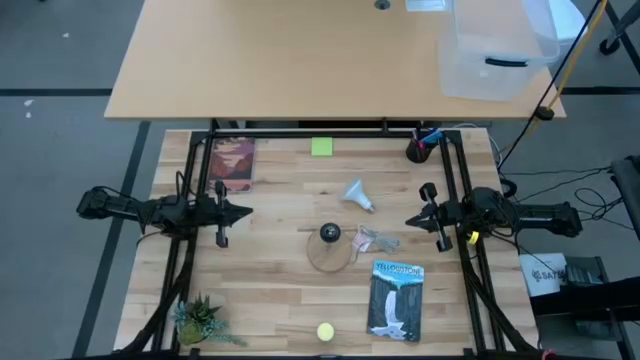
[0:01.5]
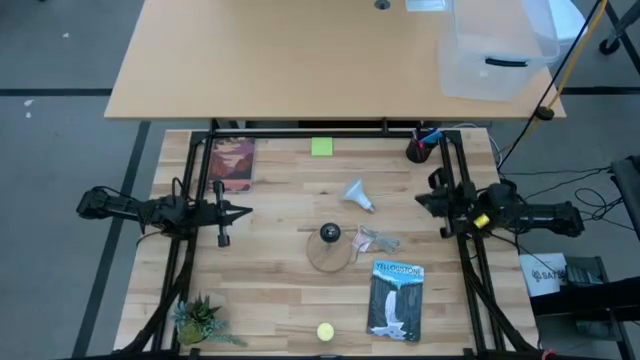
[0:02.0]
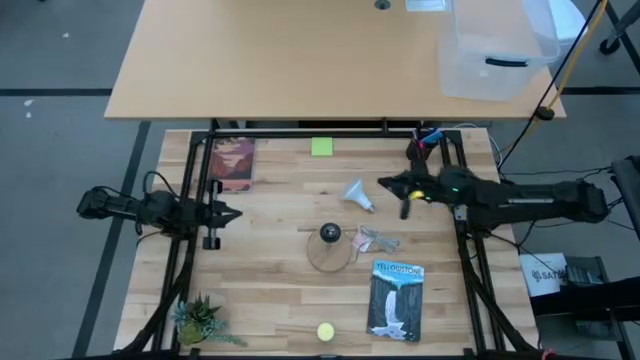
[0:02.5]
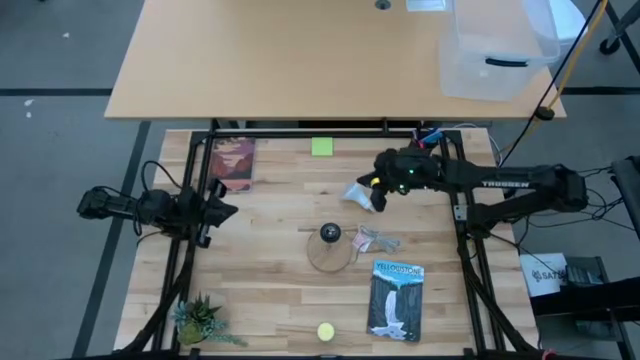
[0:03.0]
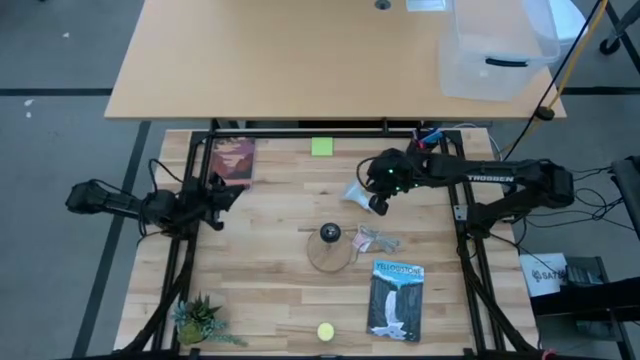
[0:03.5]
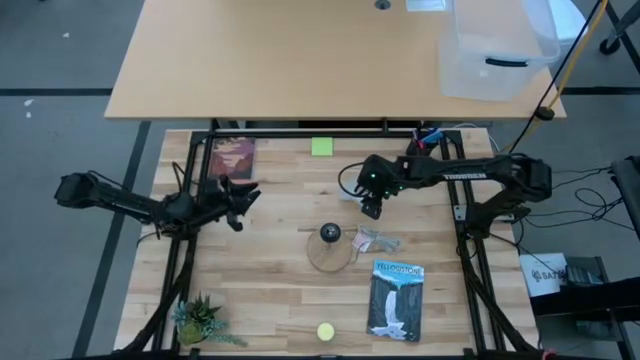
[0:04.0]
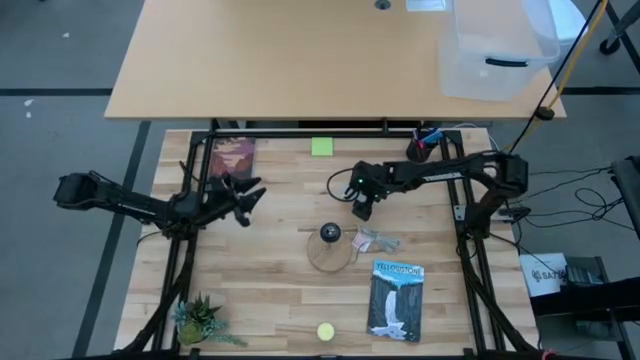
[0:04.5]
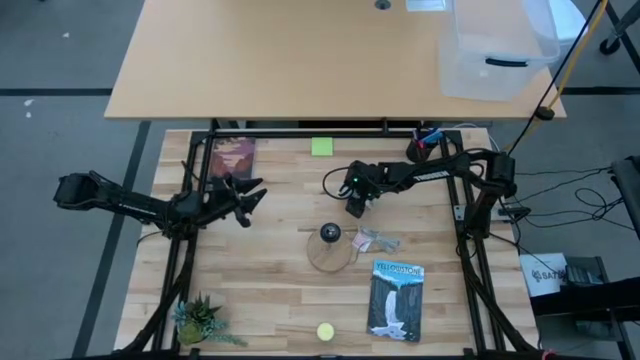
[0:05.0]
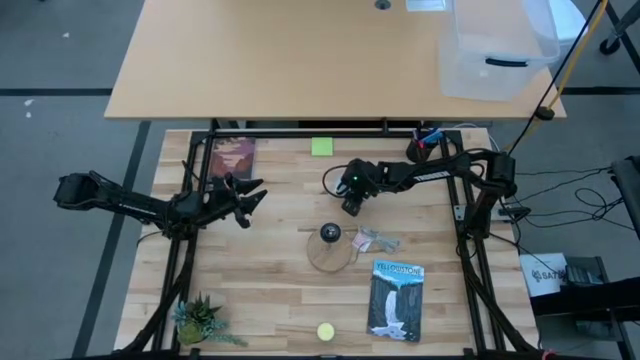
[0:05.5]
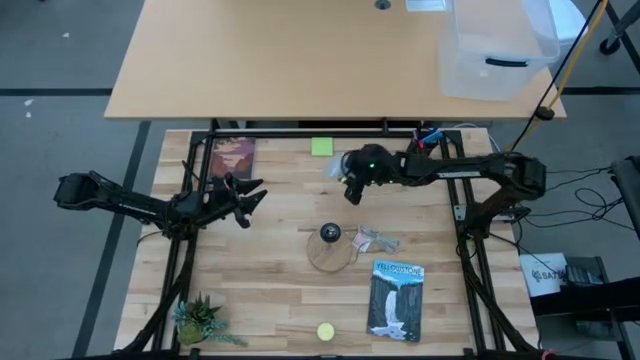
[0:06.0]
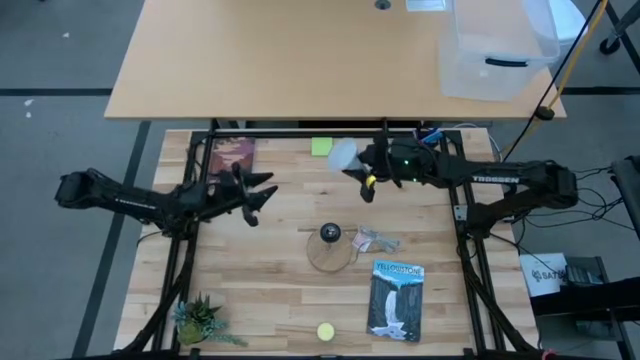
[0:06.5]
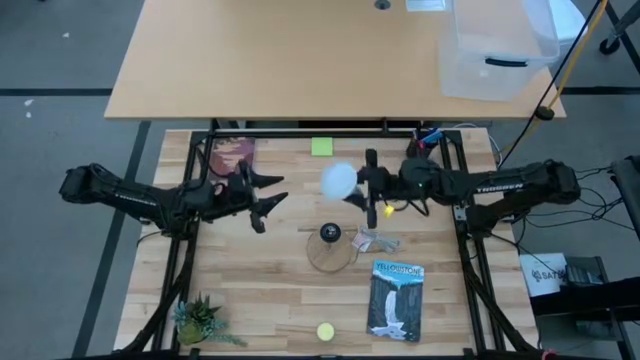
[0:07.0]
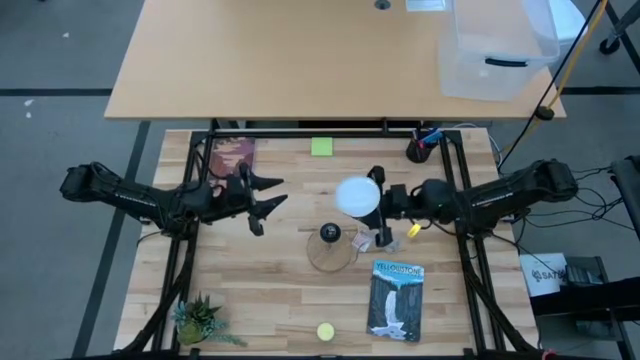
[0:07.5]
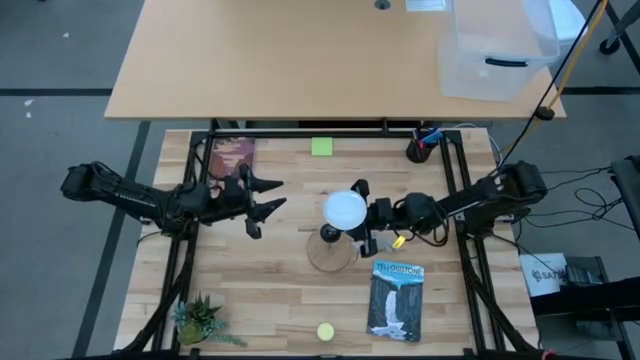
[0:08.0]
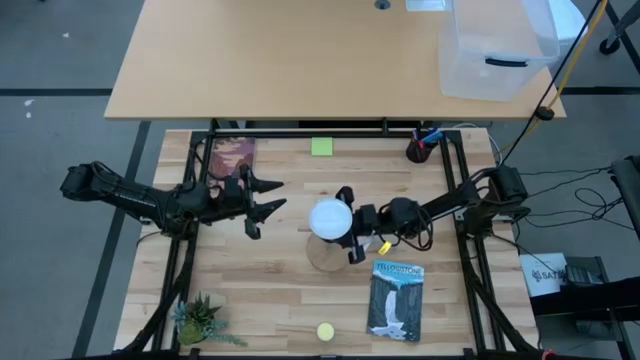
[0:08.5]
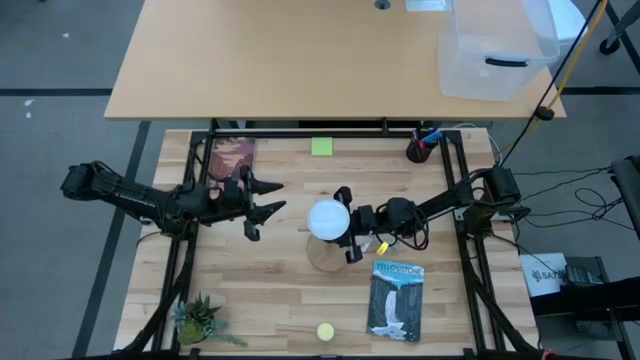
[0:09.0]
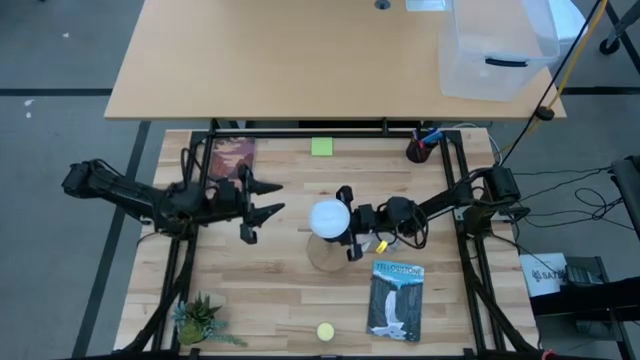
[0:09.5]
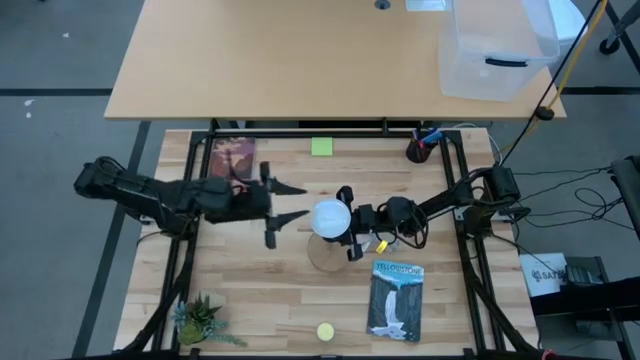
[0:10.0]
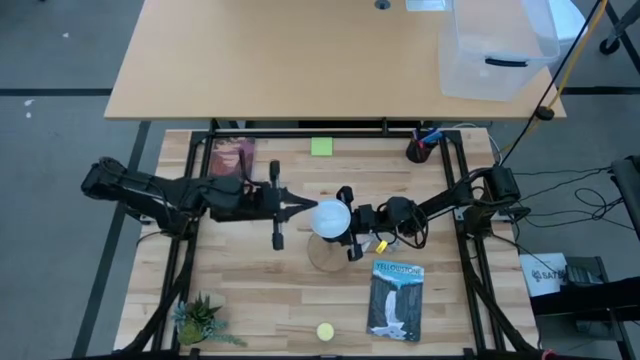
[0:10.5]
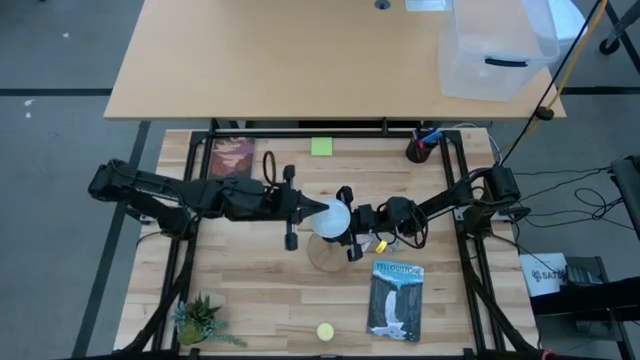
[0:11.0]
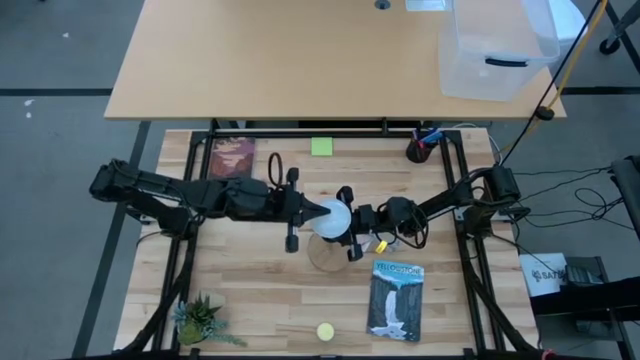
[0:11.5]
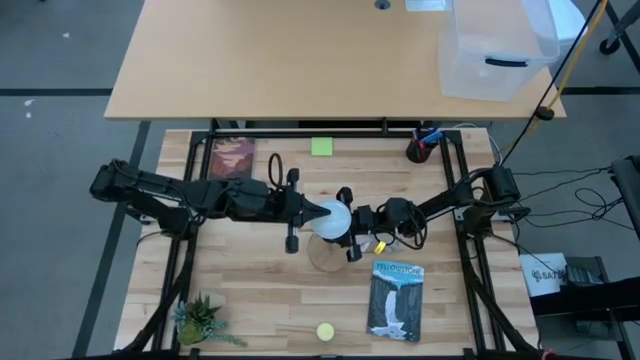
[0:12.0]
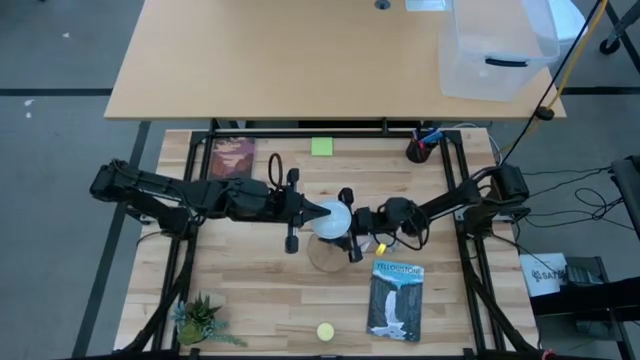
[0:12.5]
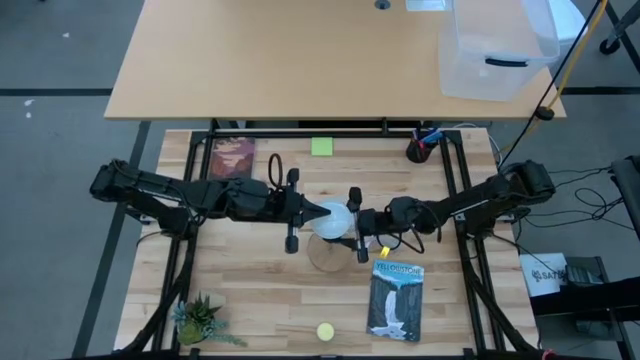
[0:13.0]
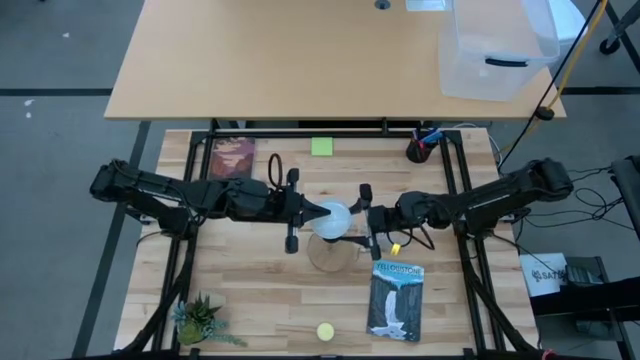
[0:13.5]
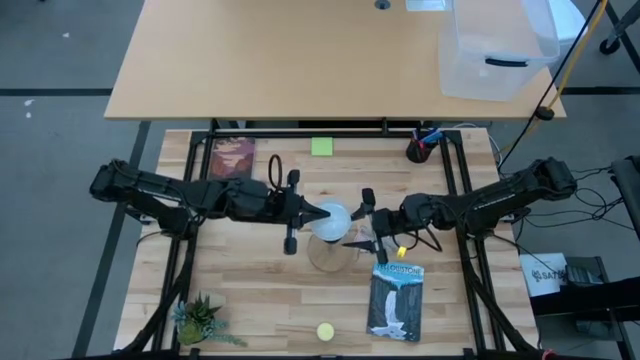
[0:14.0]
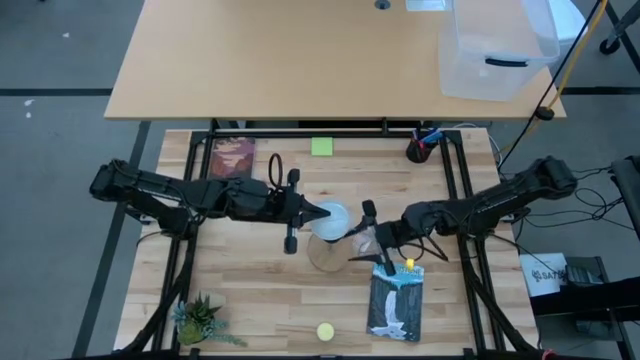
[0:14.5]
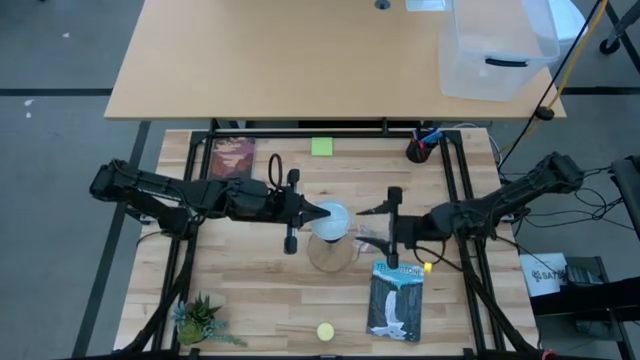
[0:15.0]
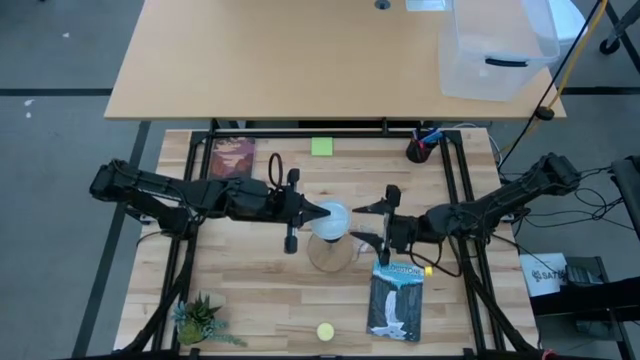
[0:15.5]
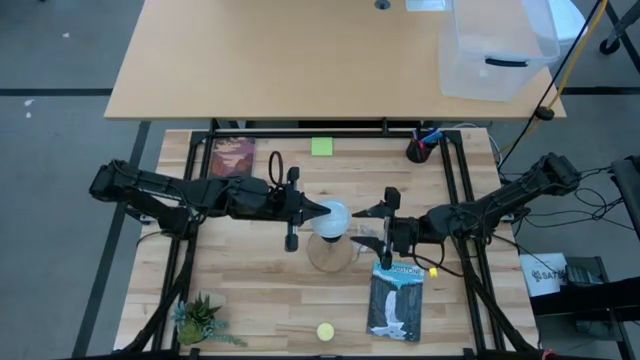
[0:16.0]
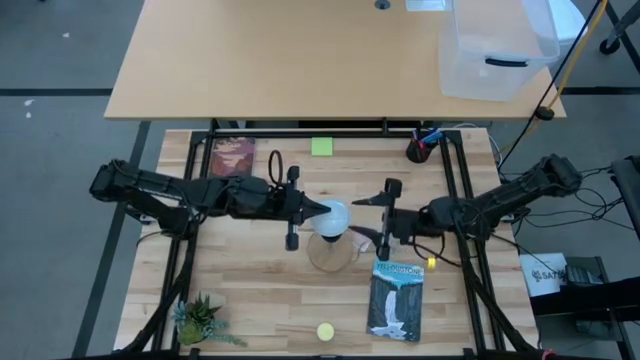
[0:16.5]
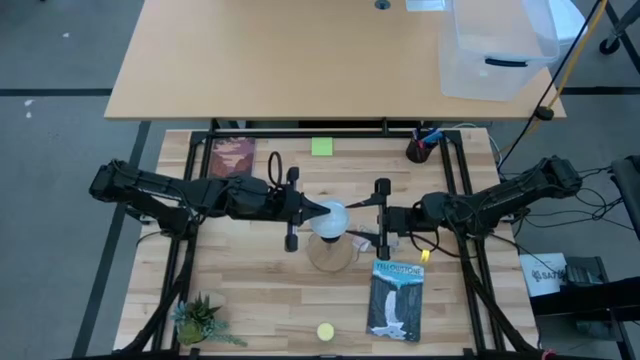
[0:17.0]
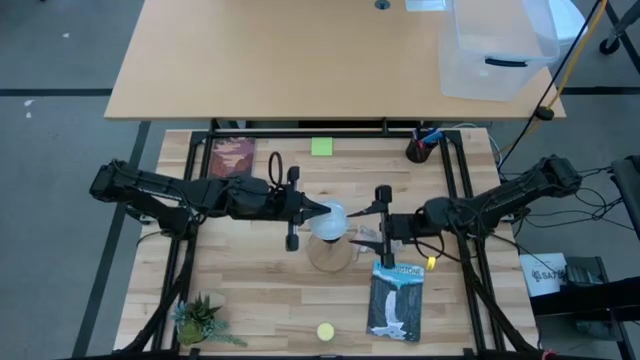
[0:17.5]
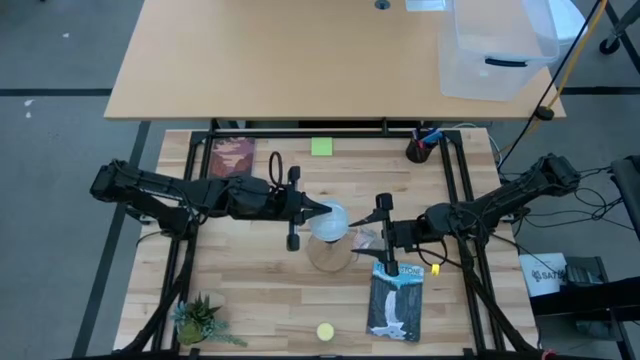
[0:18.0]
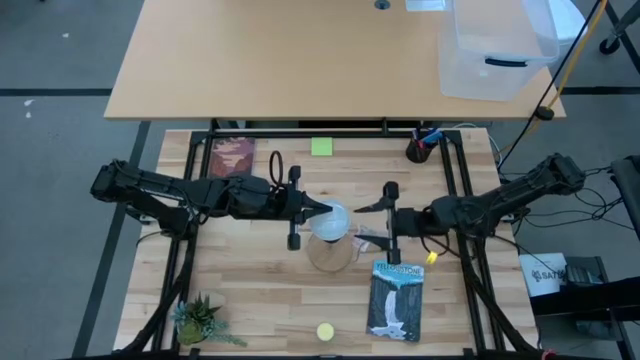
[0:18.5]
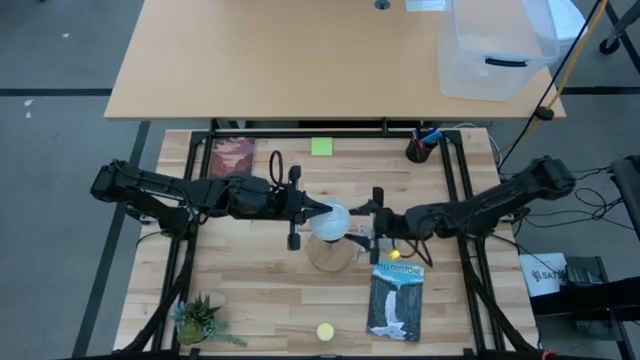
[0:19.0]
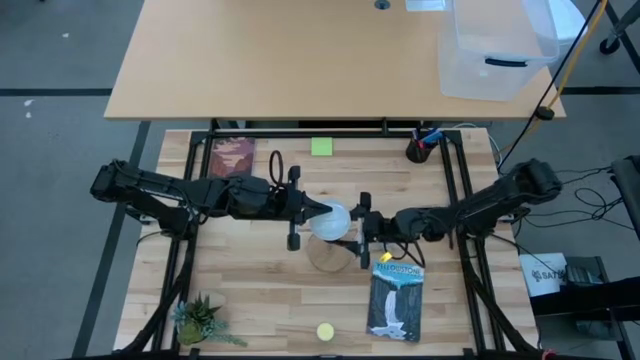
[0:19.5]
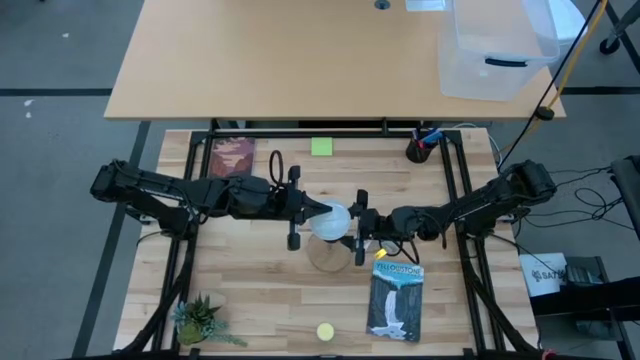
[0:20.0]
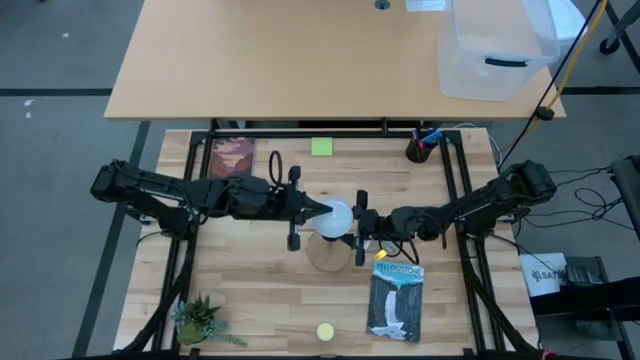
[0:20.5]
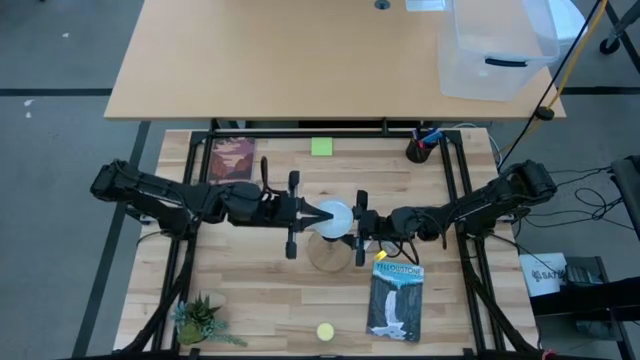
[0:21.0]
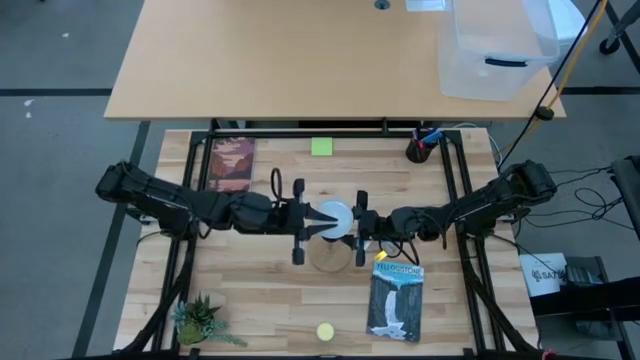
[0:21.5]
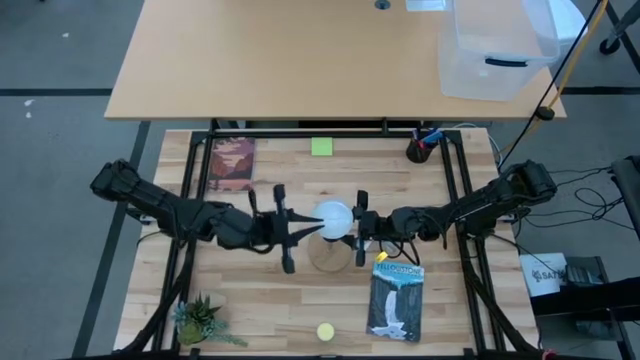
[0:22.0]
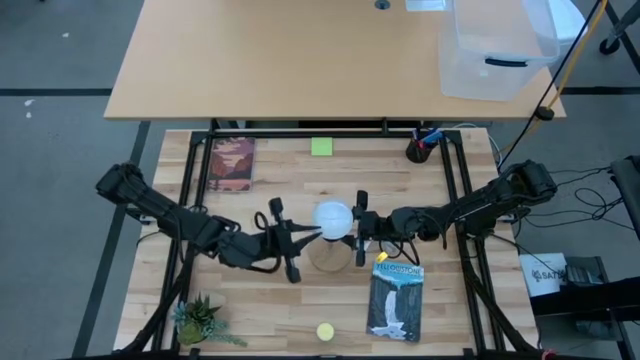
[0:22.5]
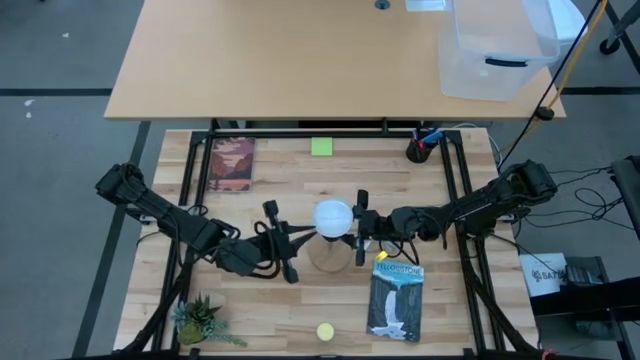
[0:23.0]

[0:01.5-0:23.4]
Task: Screw lightbulb
Insert the white lightbulb into the brown lamp
